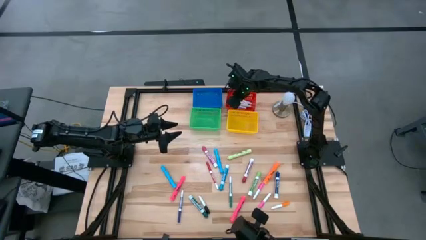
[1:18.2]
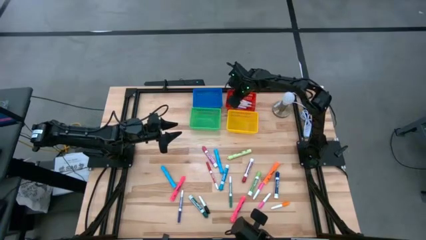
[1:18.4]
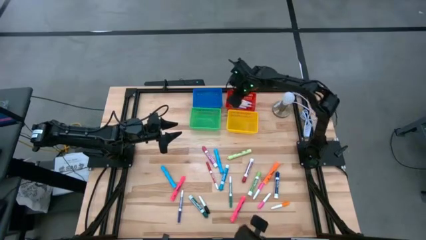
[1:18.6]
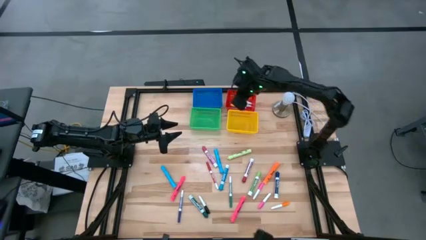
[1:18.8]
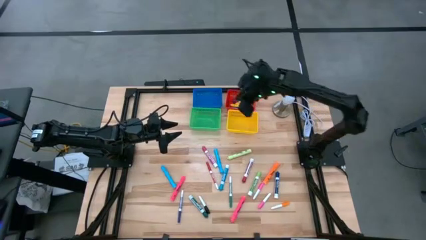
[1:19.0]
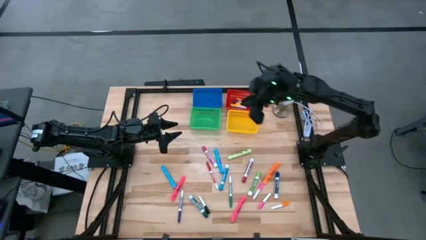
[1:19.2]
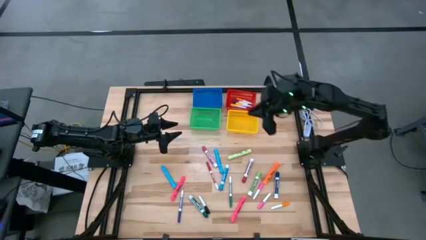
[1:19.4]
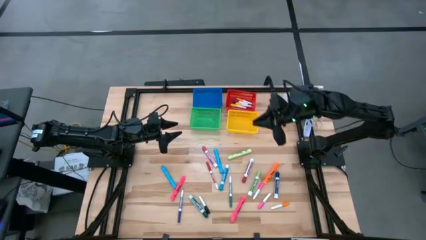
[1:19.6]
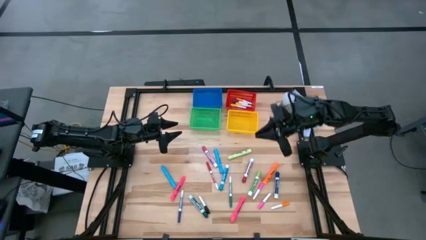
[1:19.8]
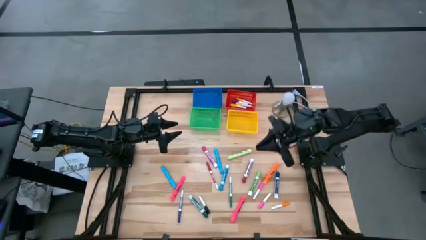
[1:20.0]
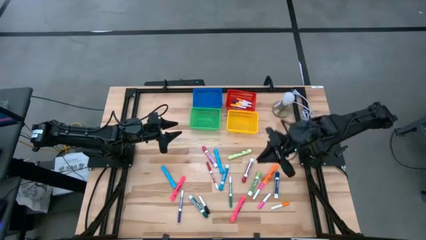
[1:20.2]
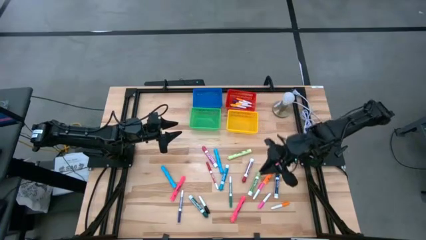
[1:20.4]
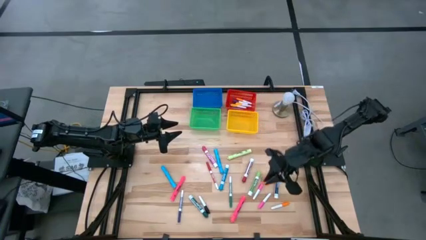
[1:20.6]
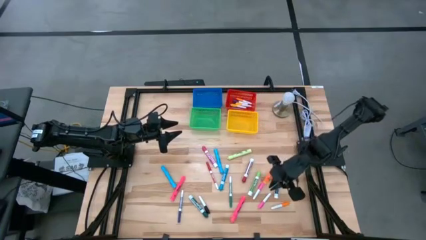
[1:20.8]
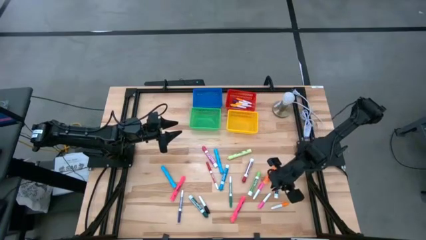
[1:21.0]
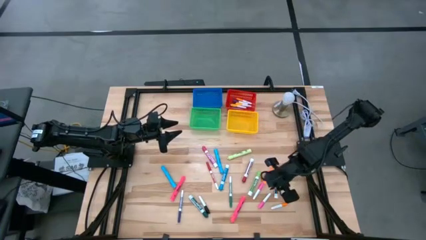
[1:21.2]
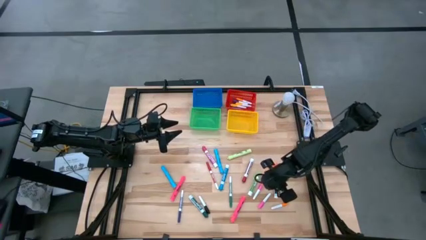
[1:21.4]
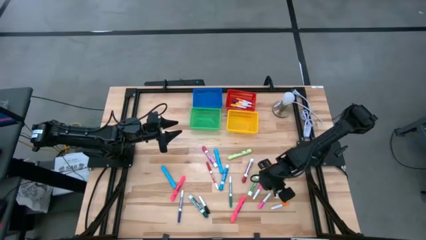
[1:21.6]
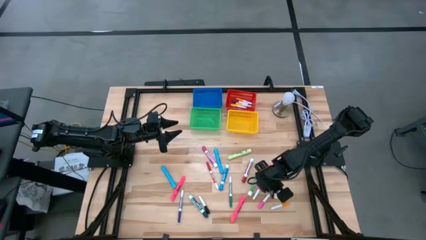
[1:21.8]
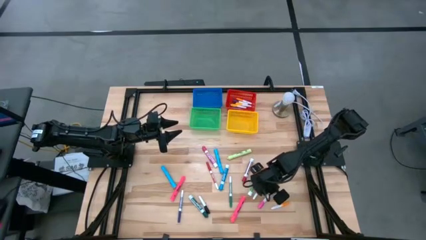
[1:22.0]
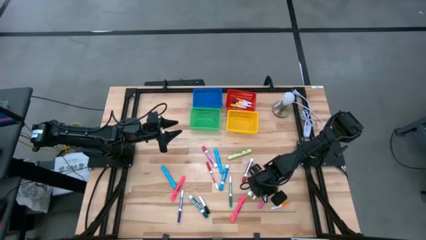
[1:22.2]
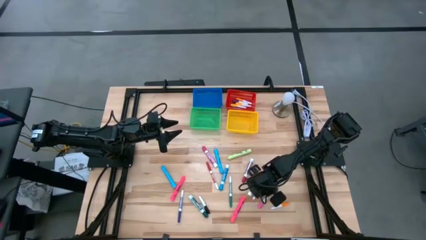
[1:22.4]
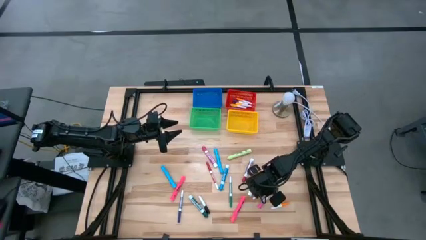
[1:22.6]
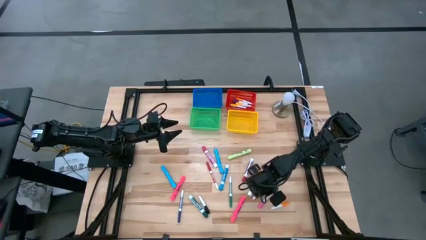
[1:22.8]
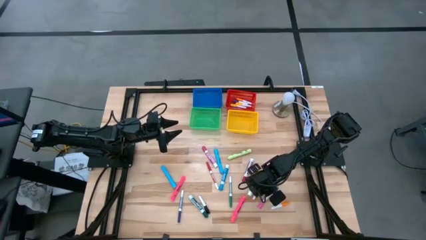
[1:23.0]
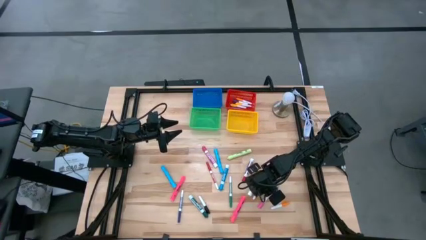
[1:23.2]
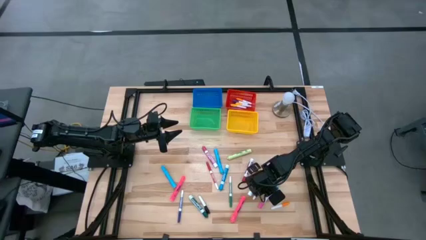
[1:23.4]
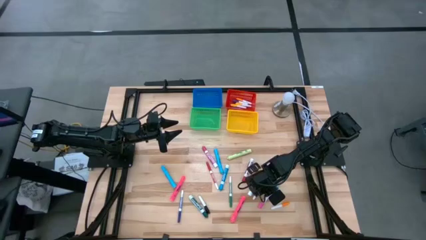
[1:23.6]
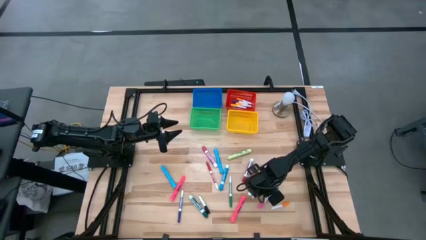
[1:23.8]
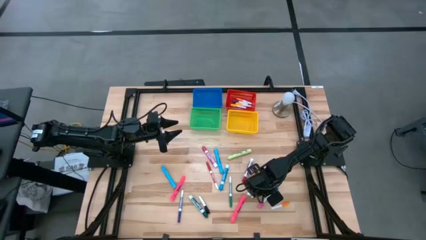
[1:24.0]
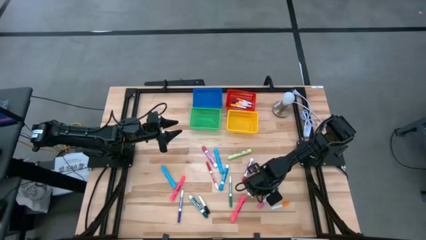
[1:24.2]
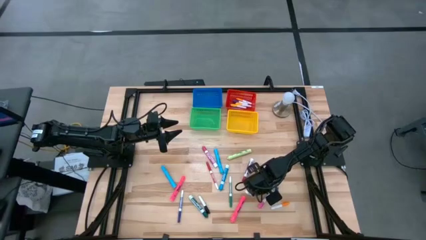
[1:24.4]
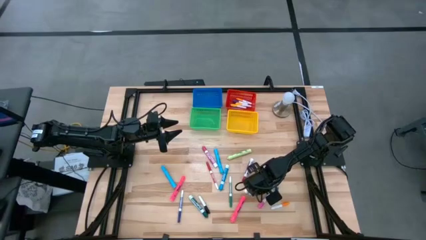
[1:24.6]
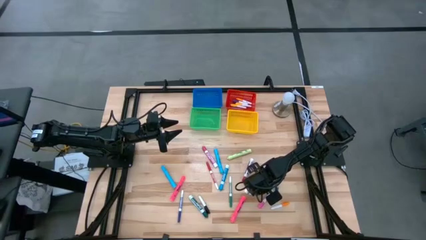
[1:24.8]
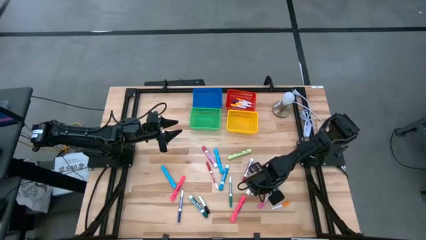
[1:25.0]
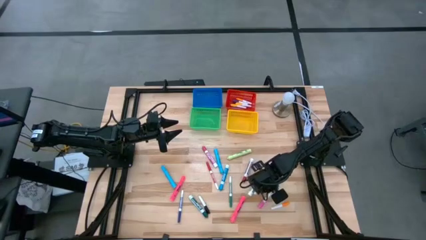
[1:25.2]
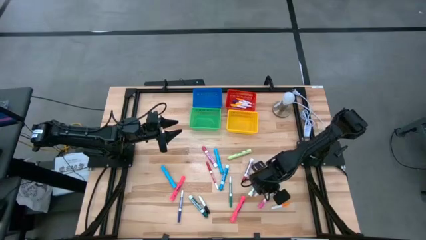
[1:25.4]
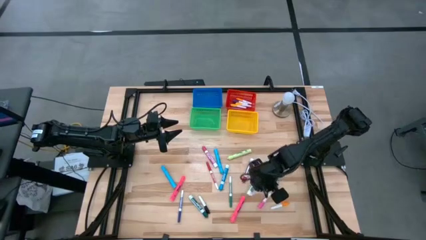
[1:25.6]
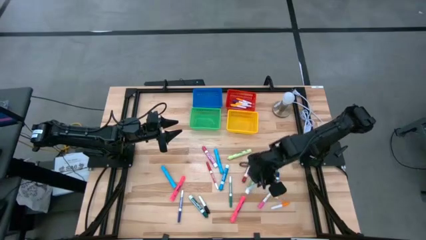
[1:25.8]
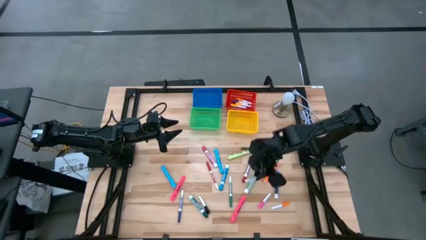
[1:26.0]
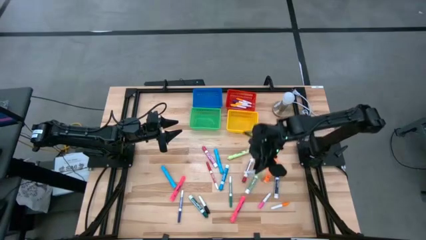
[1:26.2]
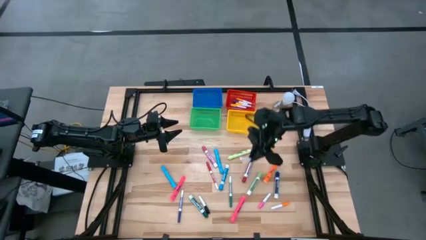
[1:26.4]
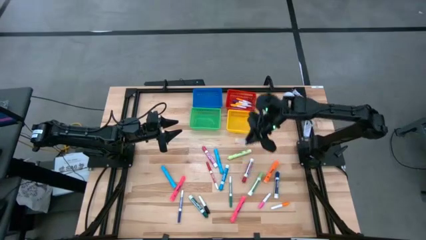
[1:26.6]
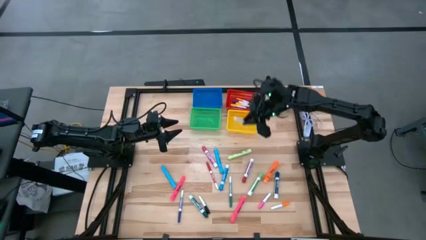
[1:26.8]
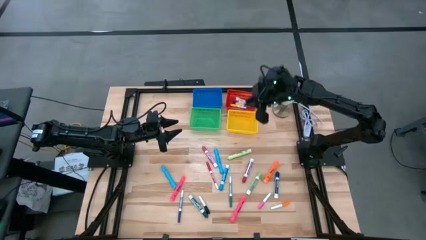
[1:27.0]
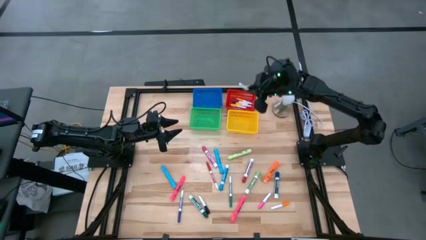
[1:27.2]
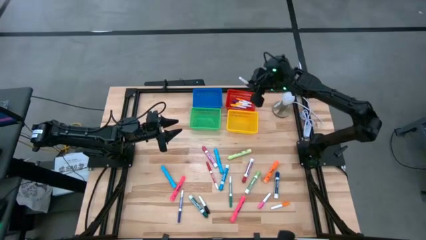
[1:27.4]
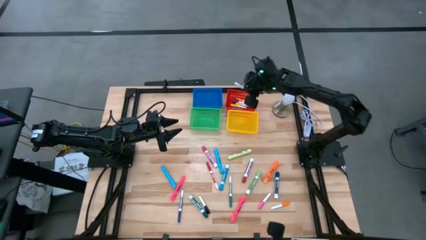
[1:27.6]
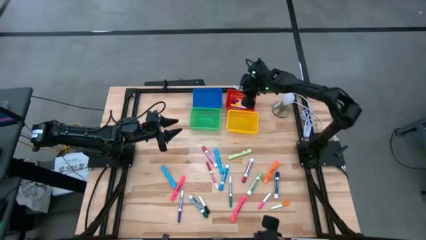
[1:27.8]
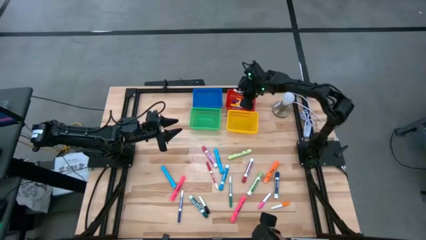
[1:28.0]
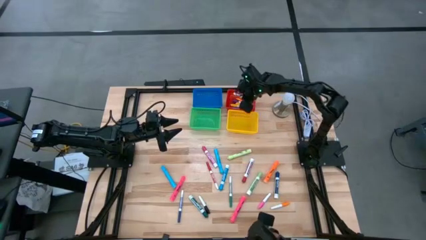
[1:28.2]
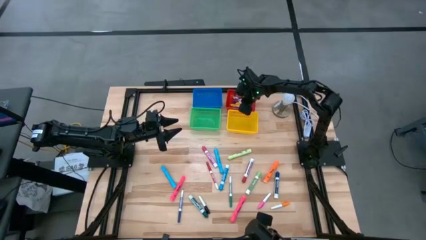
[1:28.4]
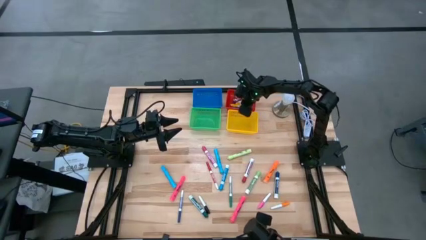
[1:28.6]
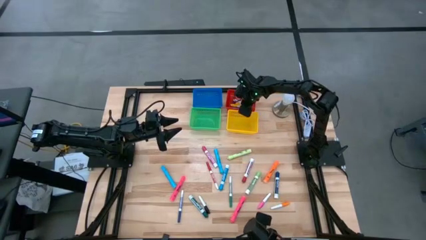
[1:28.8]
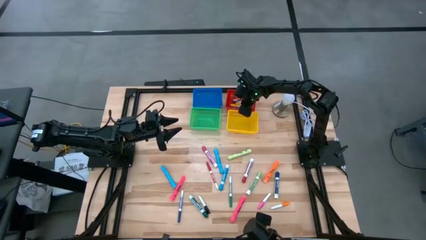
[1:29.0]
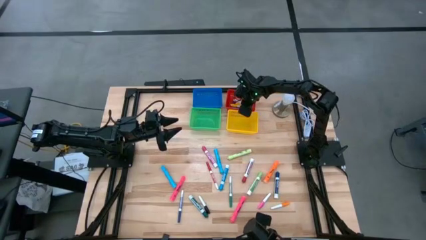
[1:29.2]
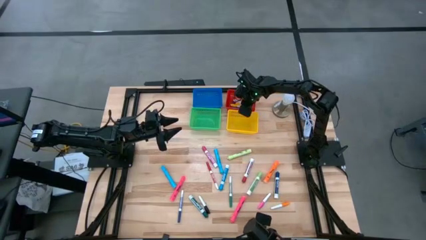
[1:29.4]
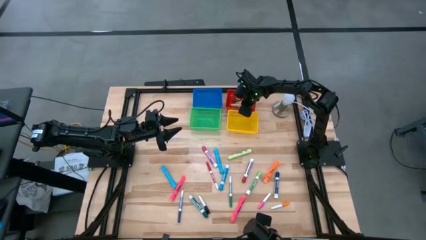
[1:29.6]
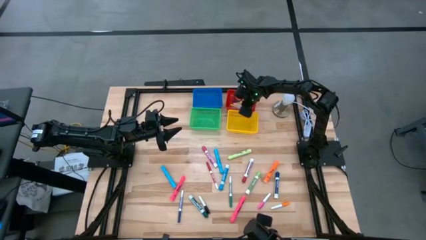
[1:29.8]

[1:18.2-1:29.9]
Task: Pick & Place Markers
Put the top pink pen into the red basket
